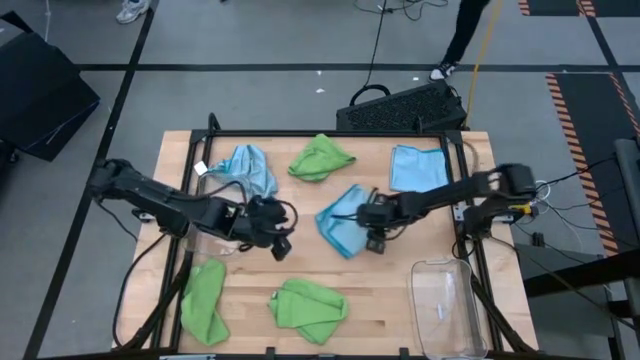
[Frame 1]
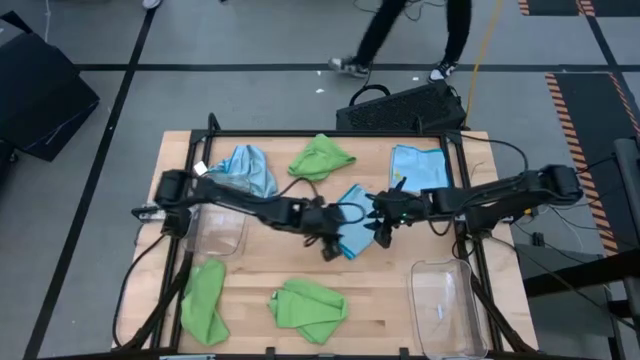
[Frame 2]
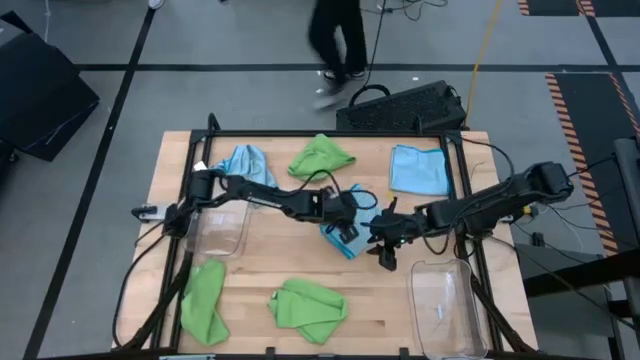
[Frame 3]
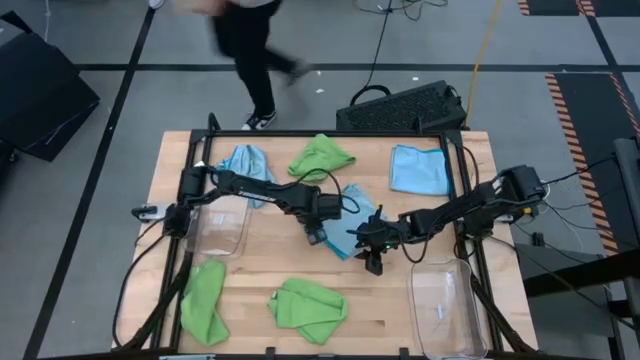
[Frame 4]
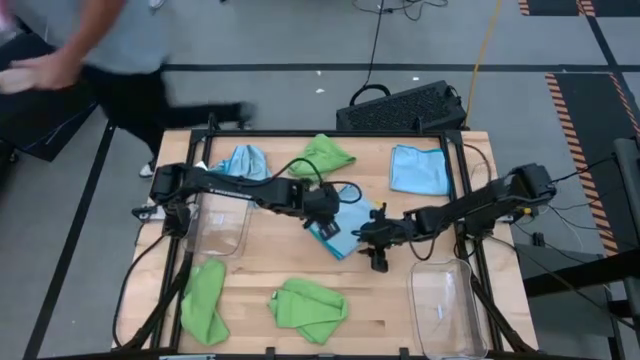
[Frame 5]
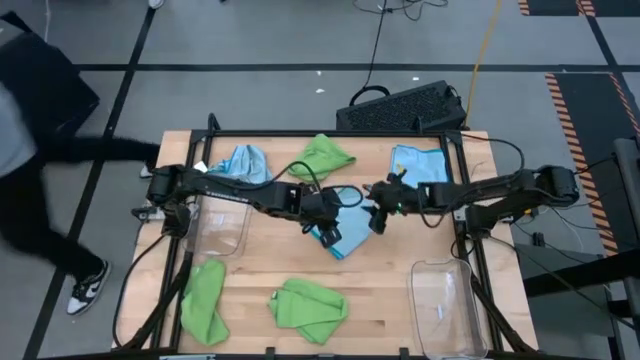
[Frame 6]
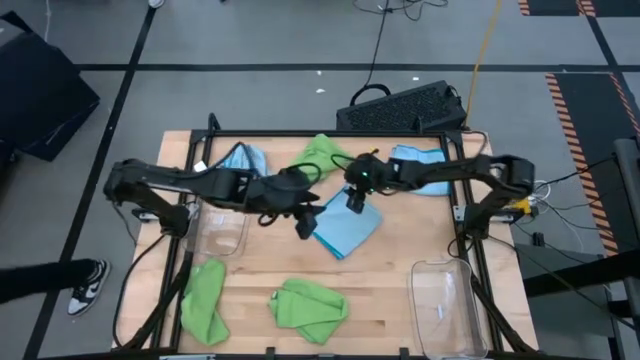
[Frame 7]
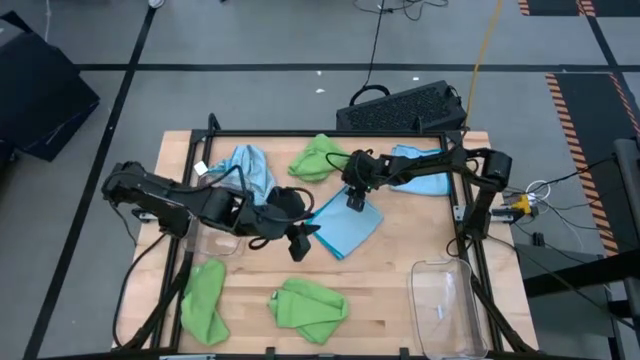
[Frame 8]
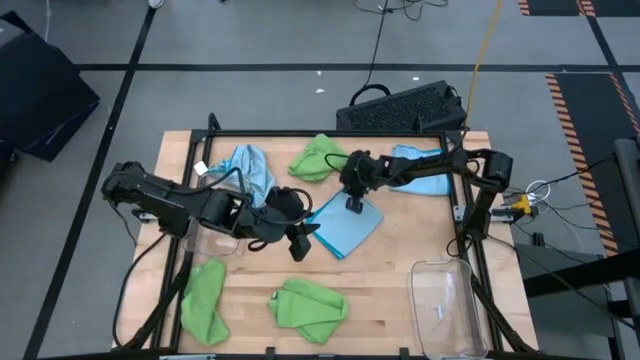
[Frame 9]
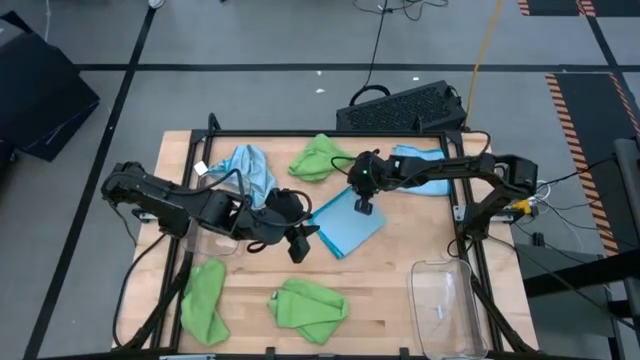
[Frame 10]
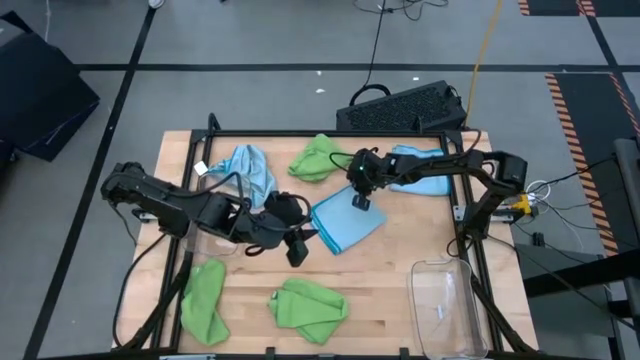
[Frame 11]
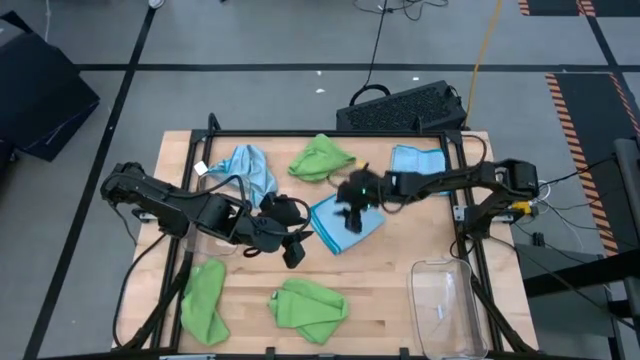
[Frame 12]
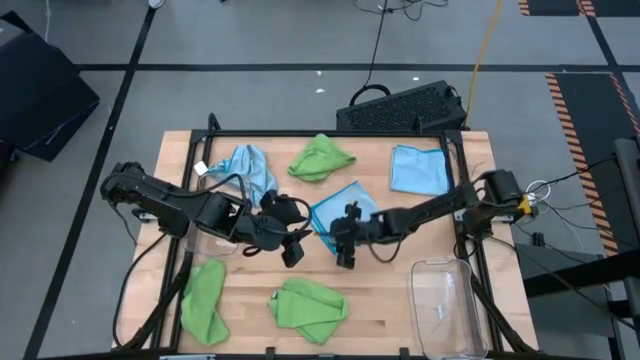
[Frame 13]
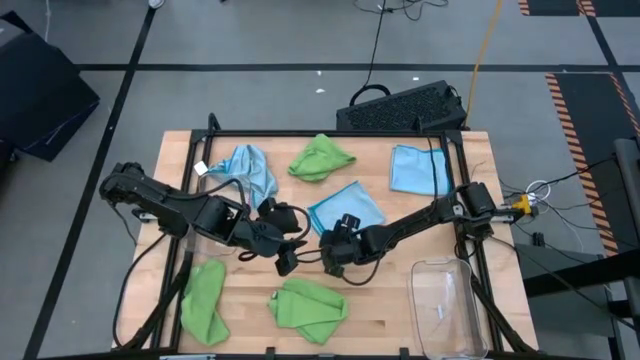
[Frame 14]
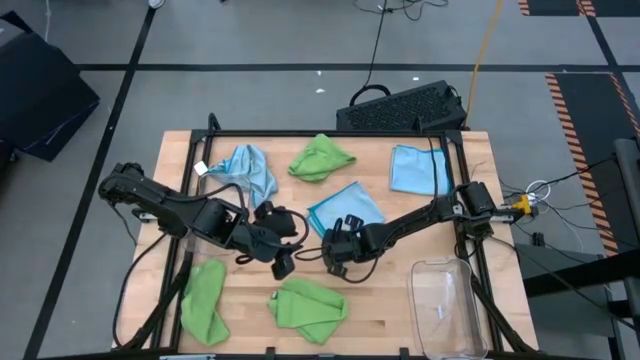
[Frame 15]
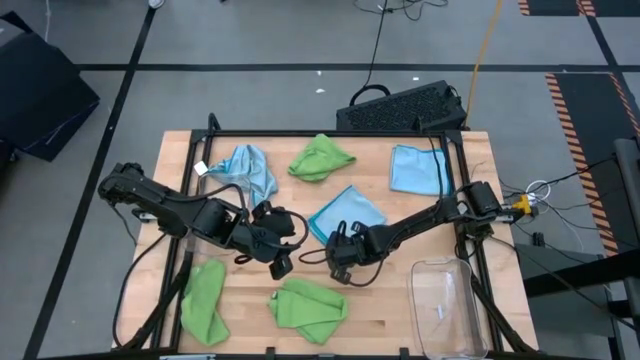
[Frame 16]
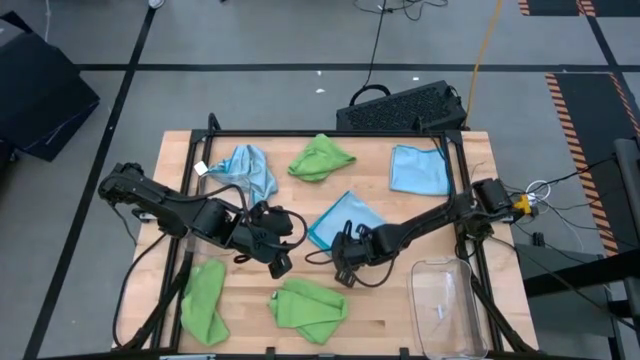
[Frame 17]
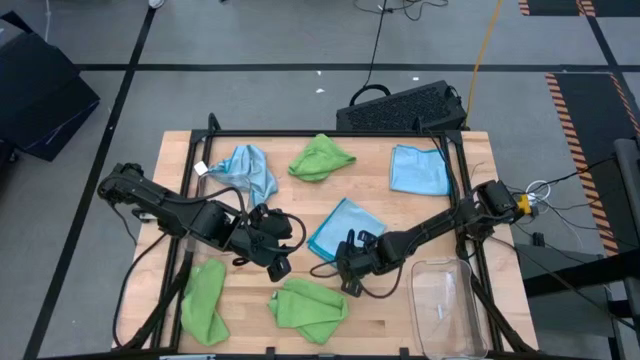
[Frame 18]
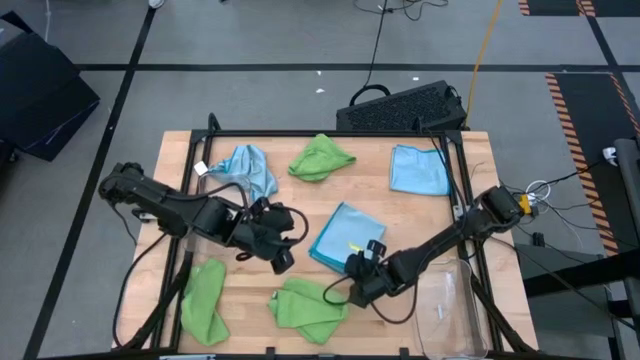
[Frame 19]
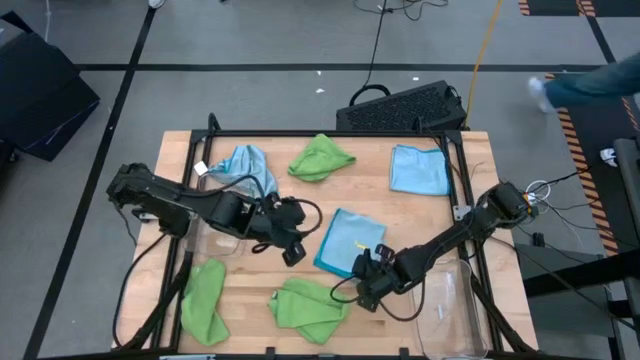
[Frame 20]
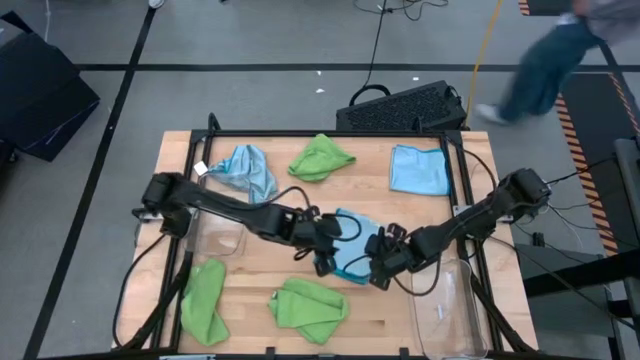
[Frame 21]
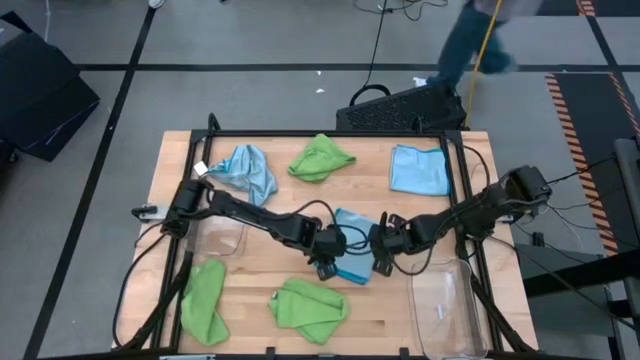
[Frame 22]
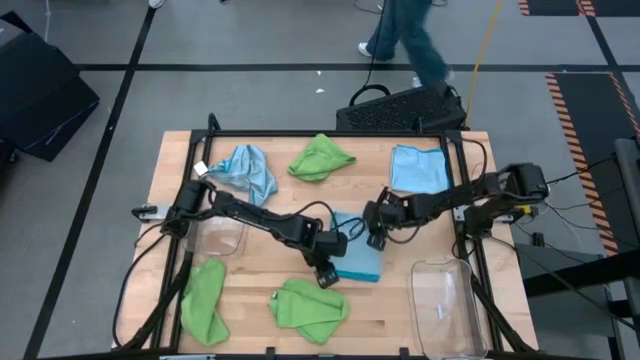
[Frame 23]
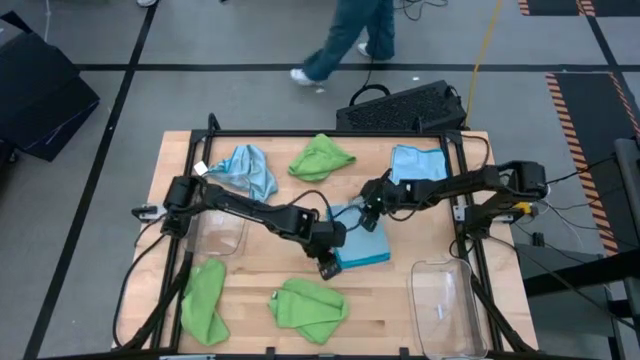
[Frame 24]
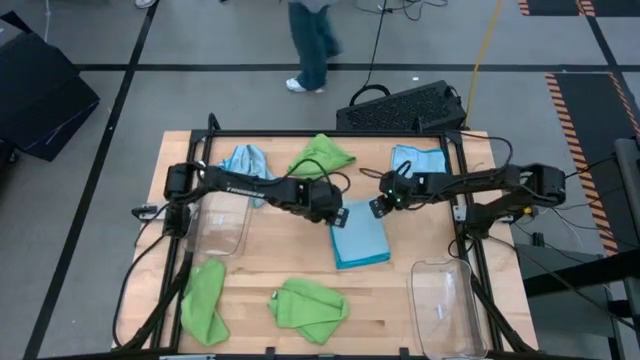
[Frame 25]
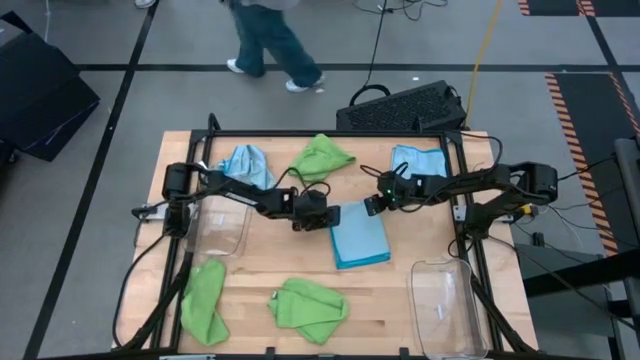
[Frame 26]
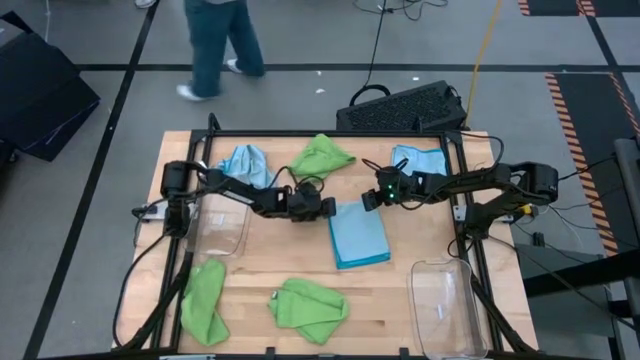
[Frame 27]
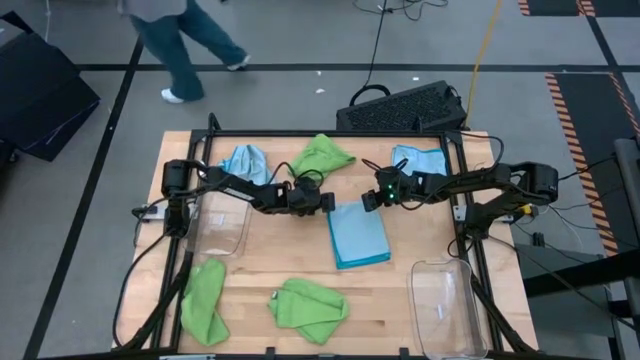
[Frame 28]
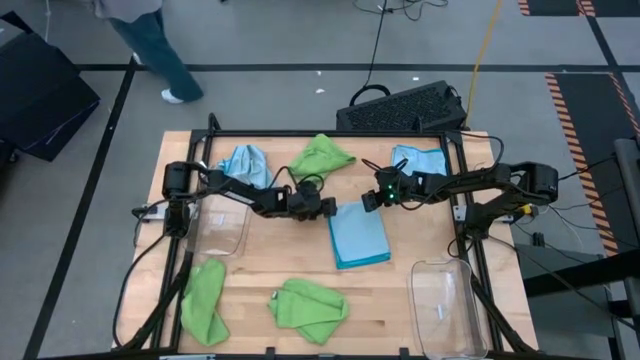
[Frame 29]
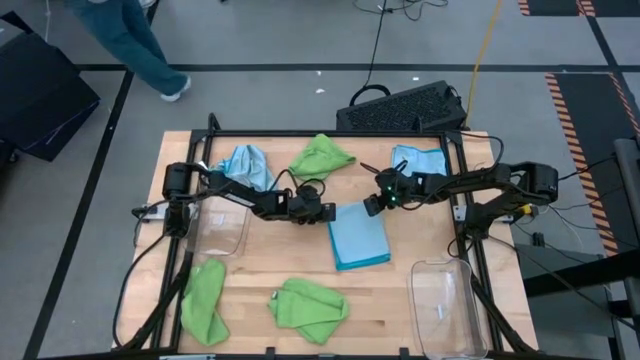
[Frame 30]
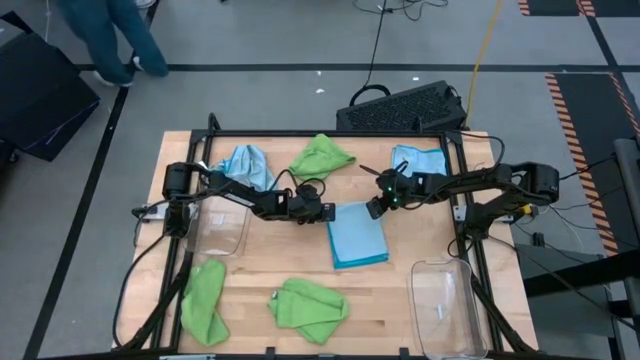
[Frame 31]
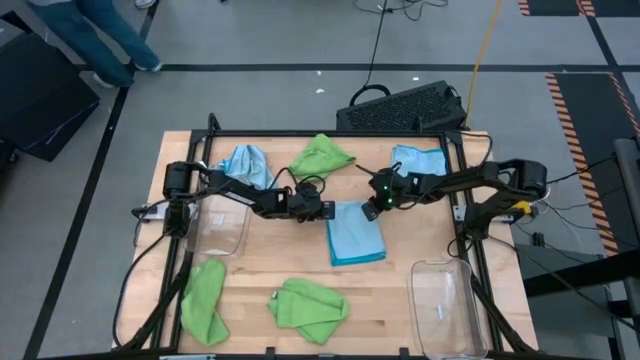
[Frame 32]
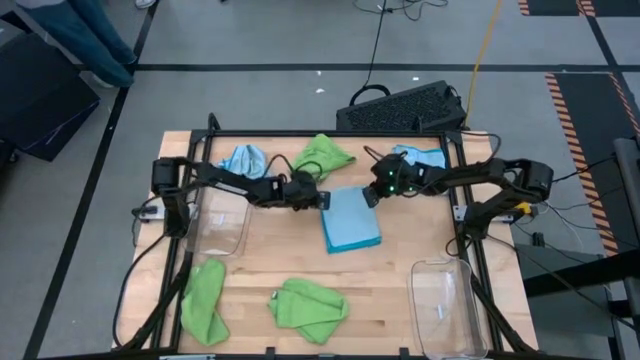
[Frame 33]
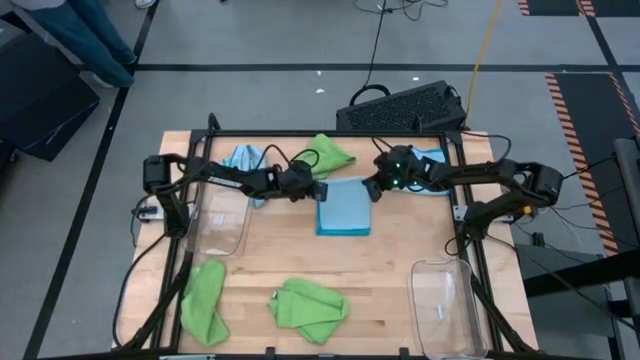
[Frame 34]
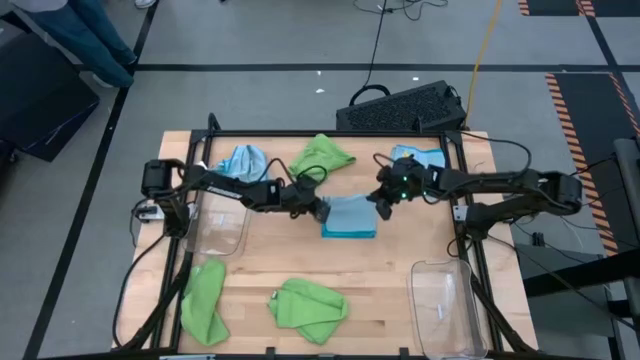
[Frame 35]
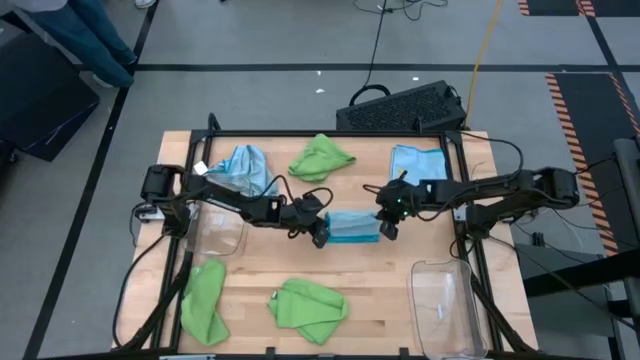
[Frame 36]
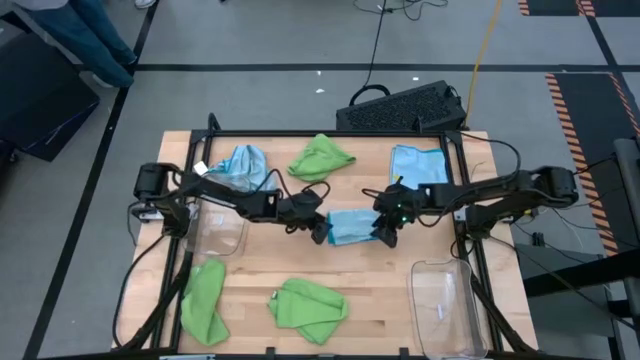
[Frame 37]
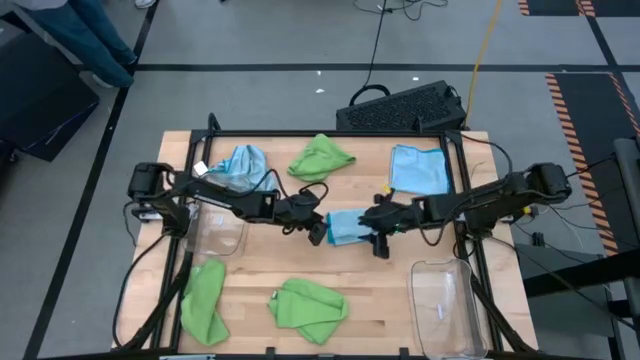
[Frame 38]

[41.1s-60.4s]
Task: Sort microfiber towel by color & place in baskets
Fold the bottom blue microfiber towel

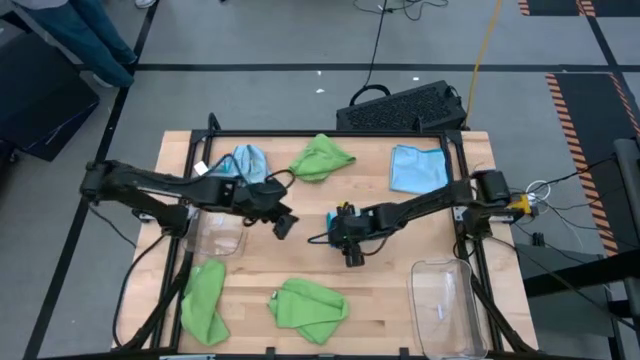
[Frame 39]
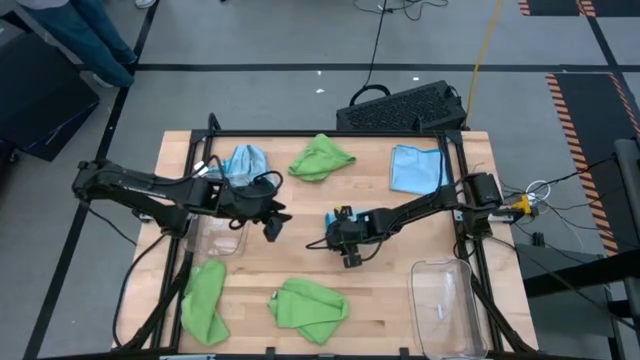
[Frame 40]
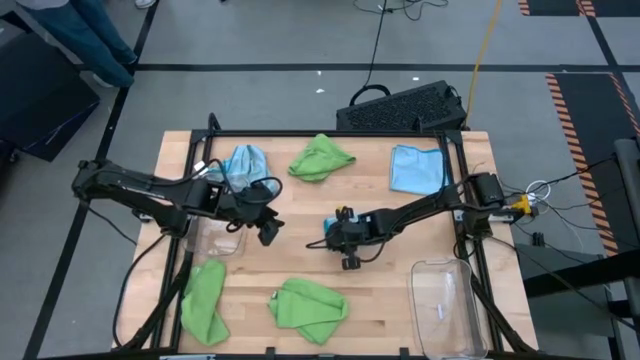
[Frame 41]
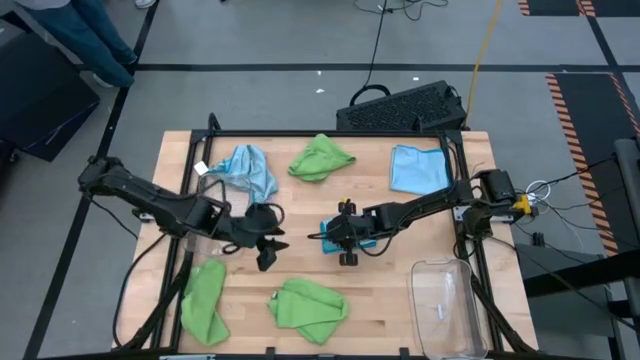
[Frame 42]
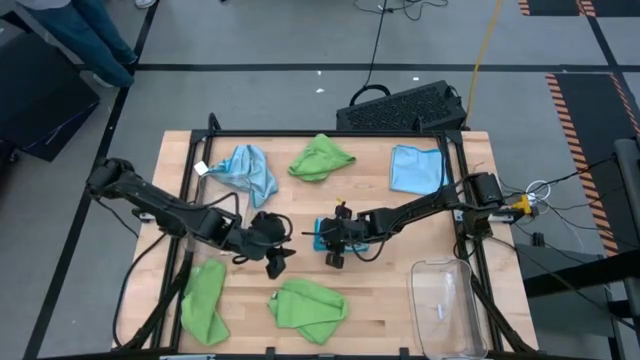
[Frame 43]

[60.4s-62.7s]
Fold the bottom blue microfiber towel
